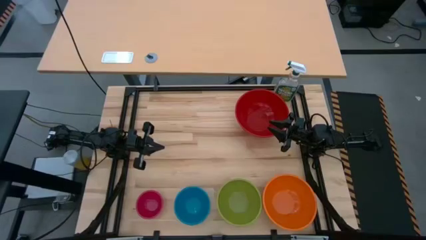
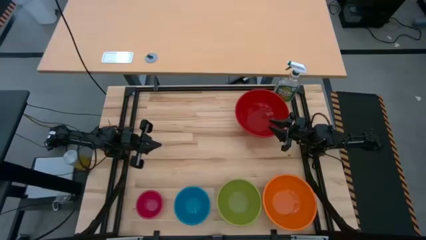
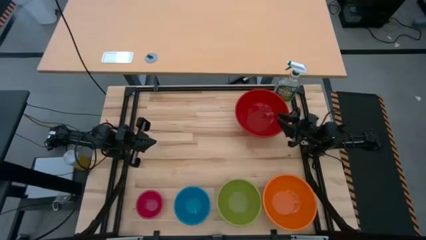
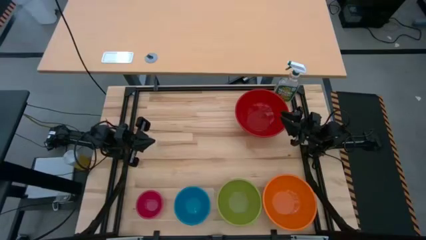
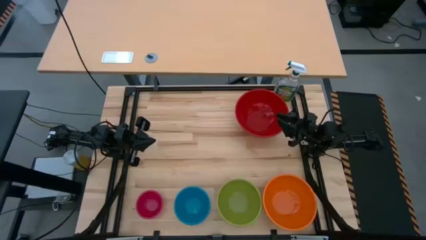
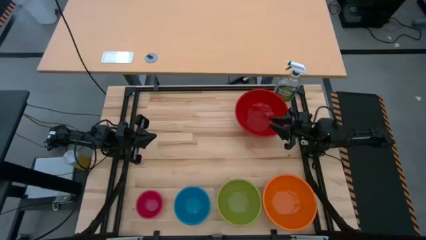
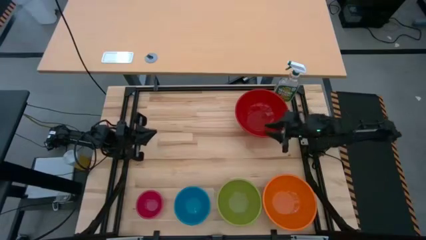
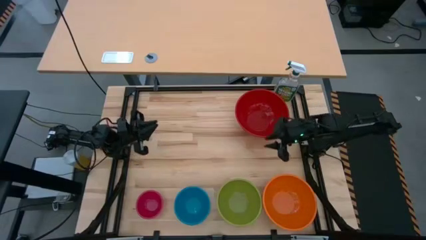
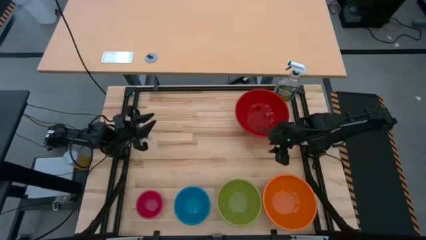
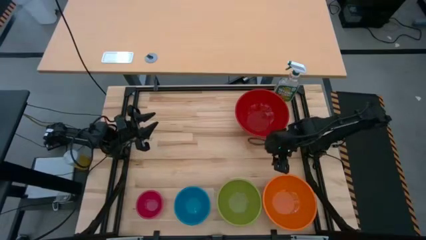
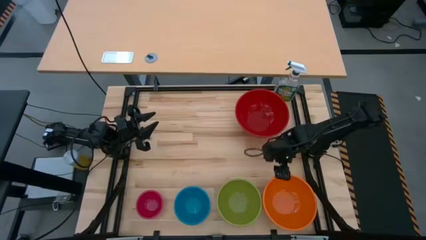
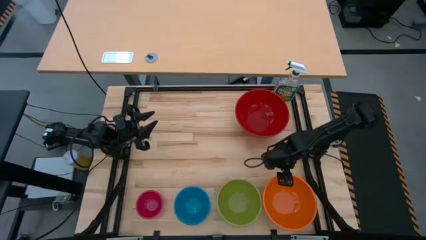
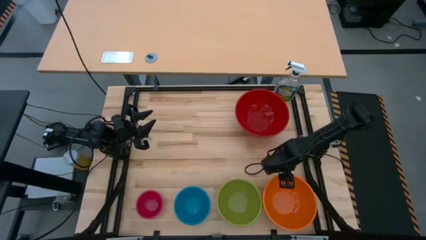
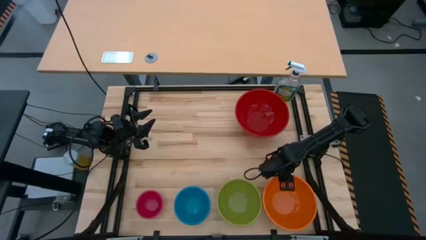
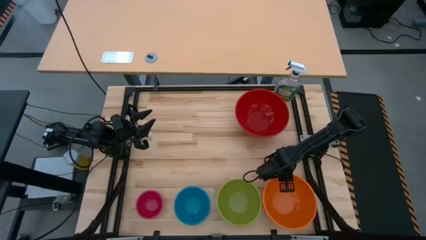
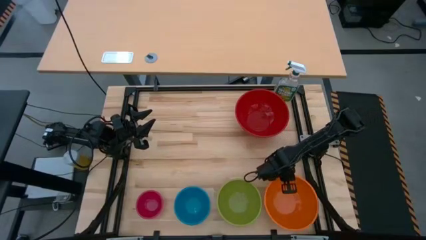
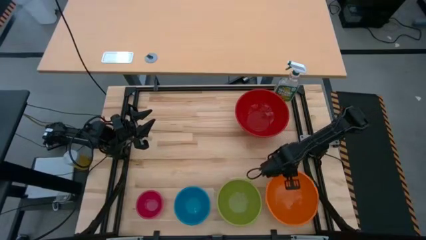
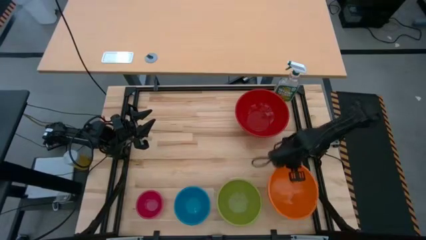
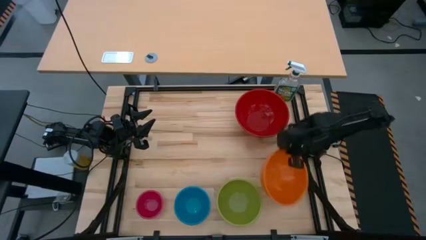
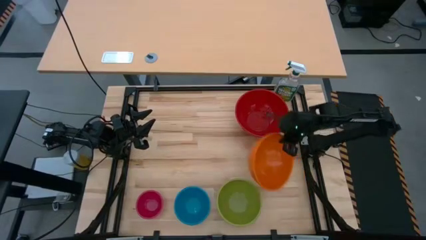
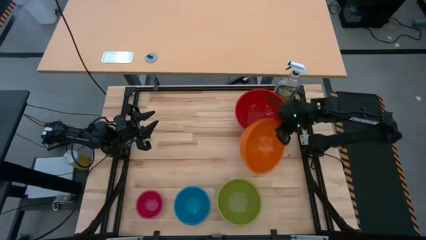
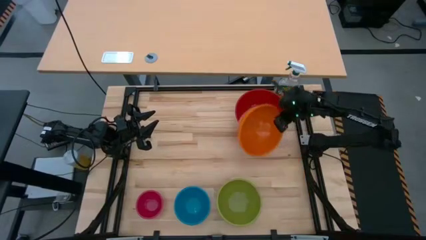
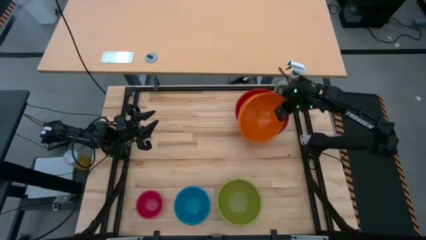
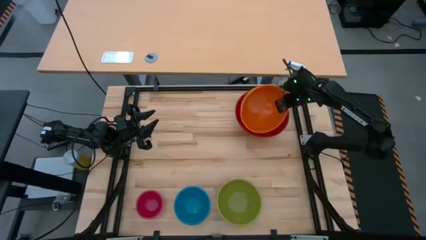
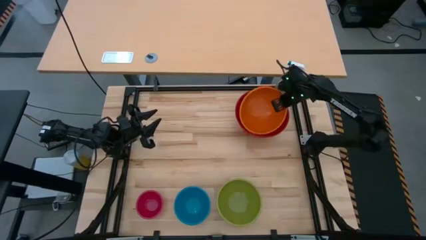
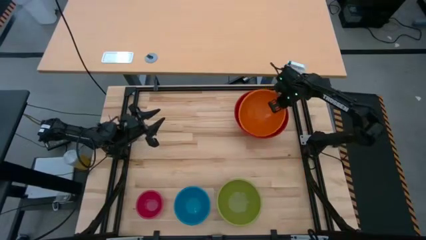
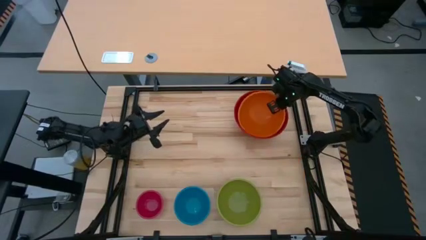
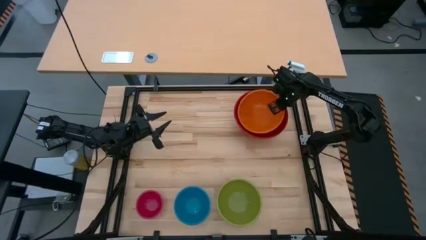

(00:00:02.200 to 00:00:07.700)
Stack the orange bowl on top of the red bowl

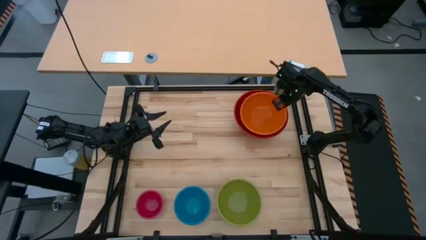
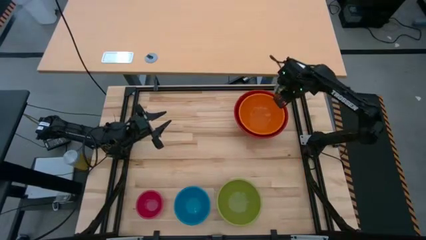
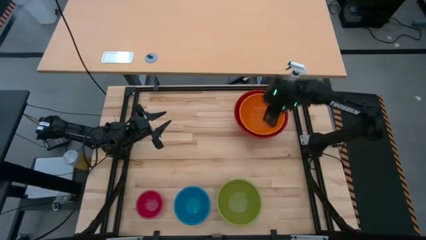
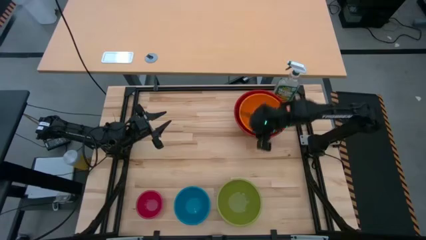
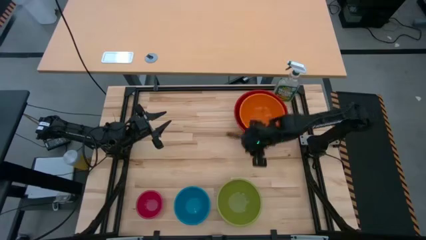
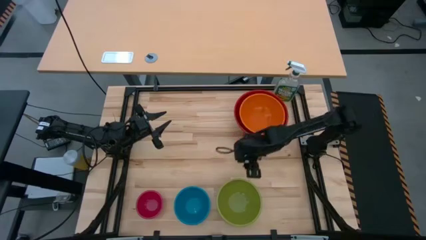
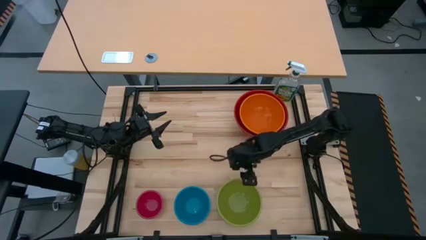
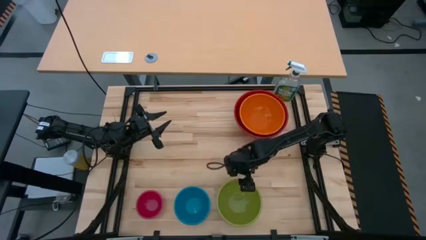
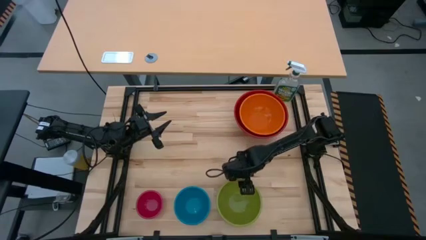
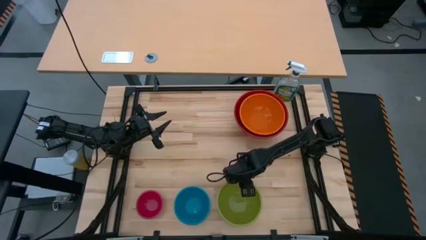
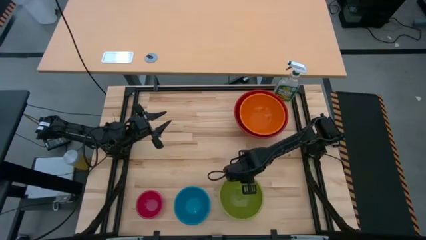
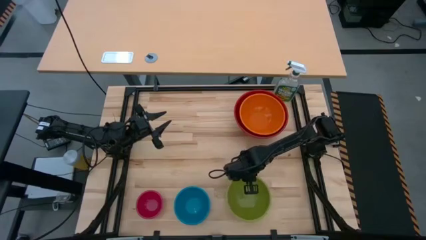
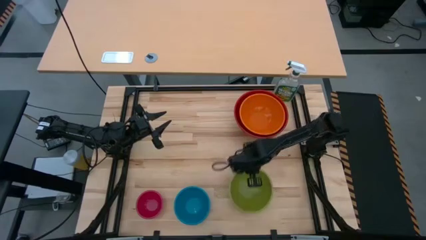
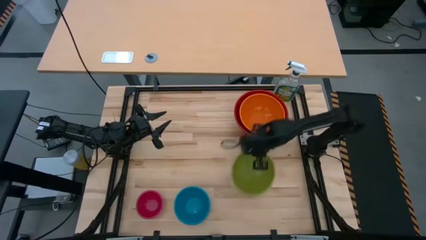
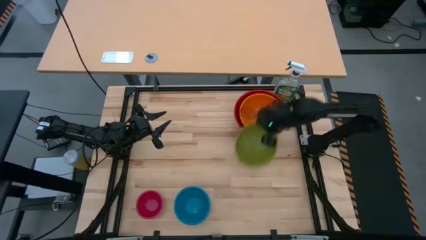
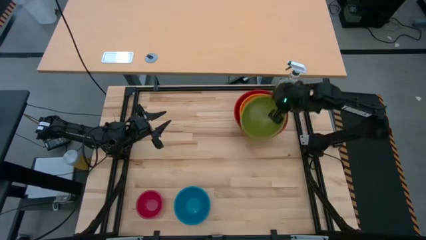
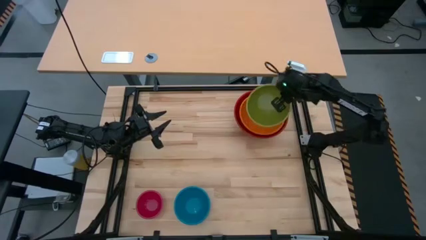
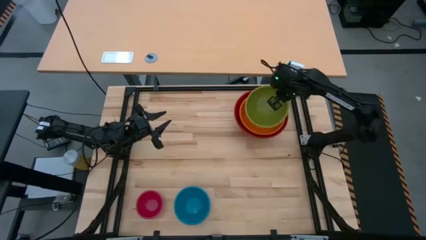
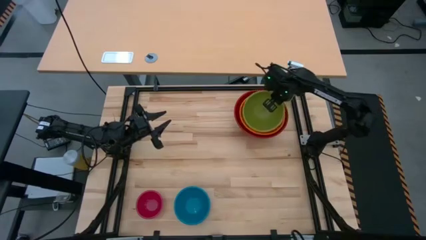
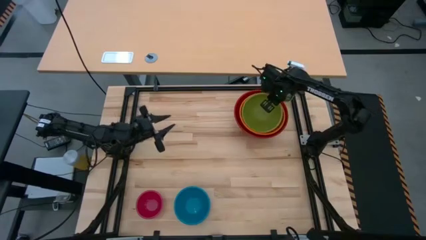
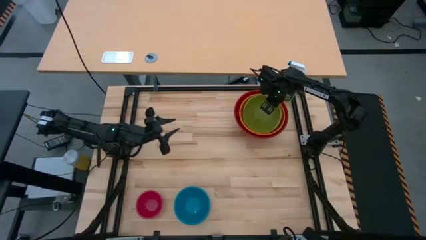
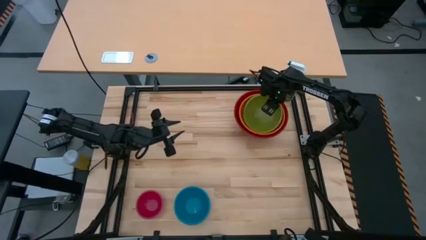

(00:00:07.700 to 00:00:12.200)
Stack the green bowl on top of the orange bowl

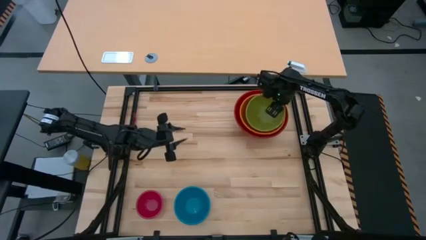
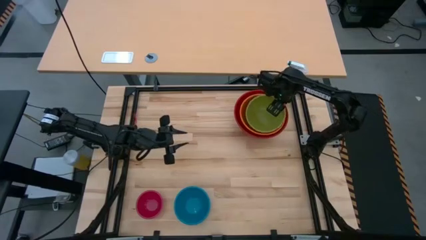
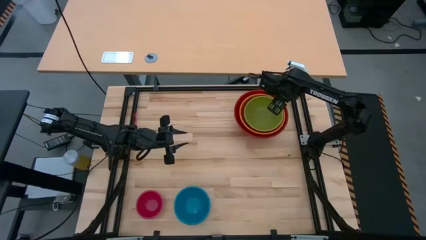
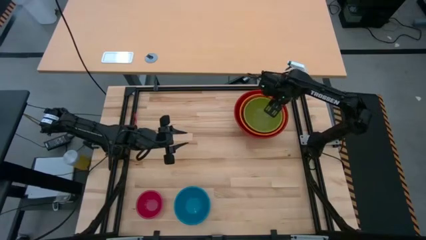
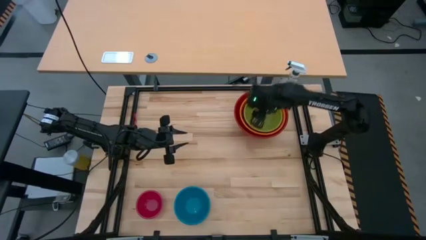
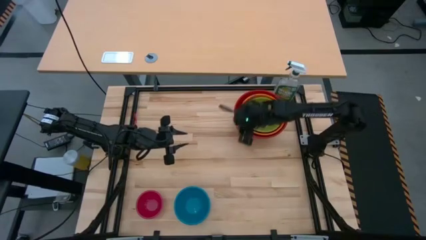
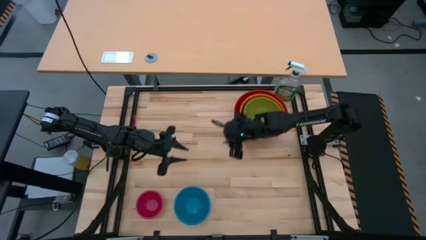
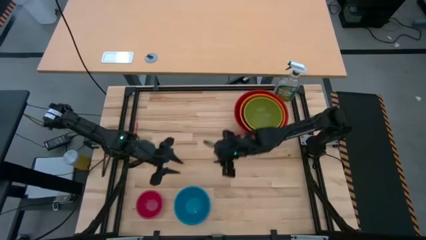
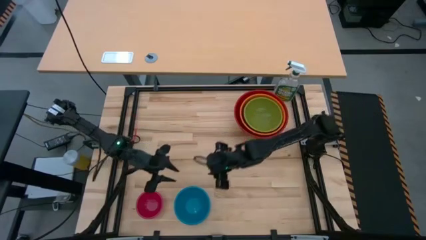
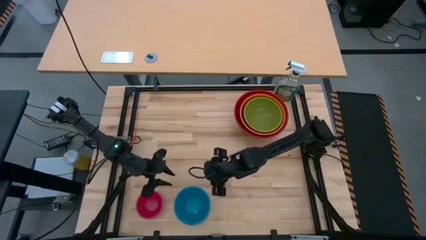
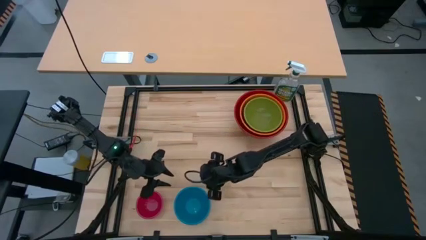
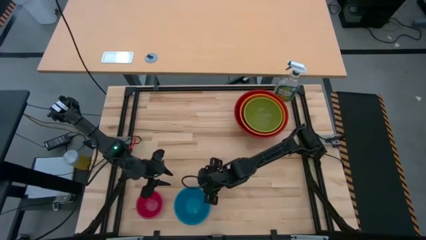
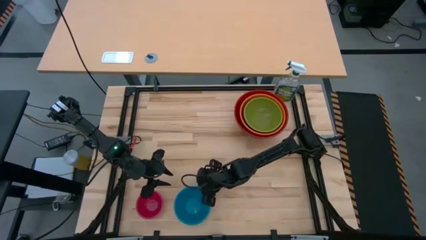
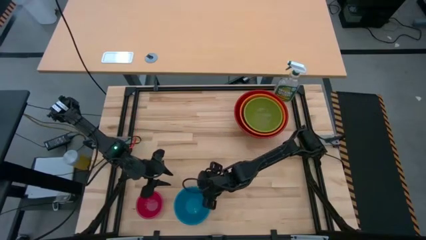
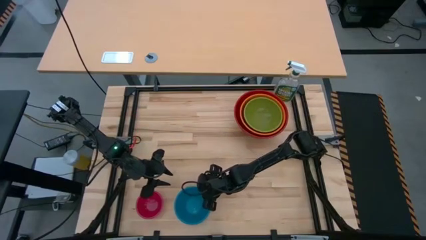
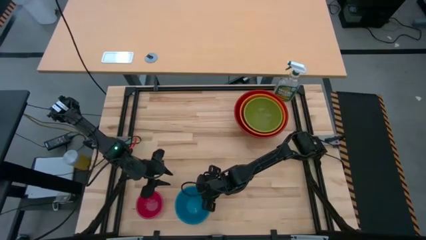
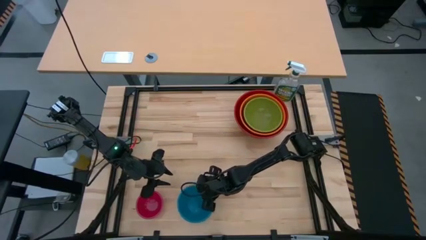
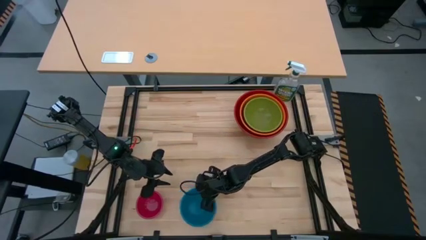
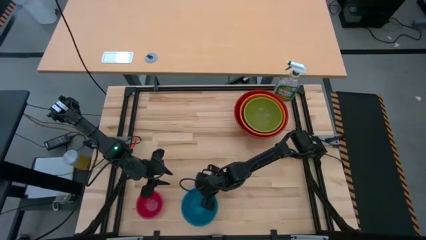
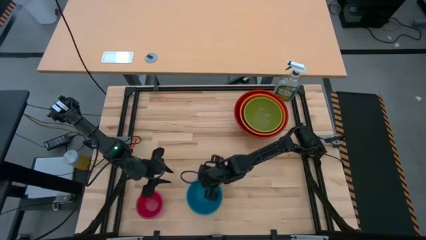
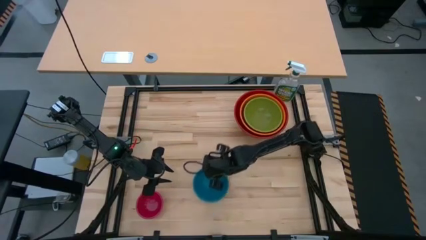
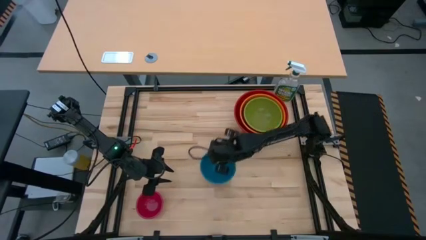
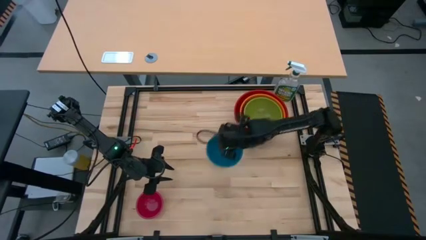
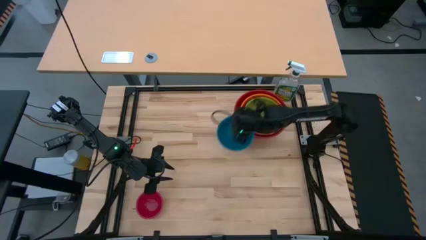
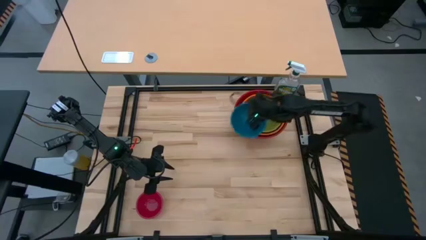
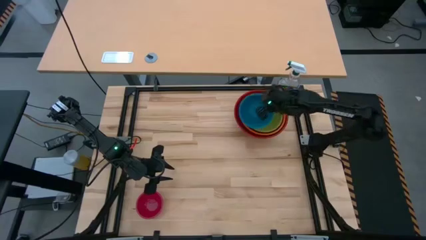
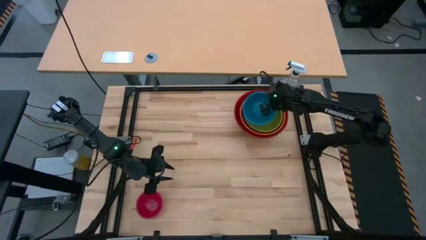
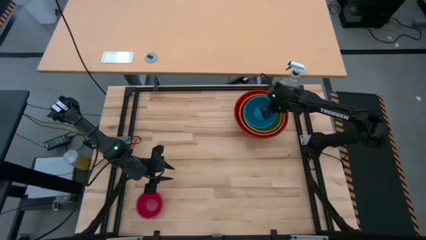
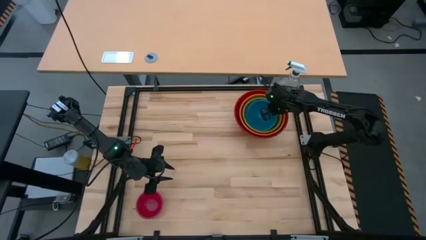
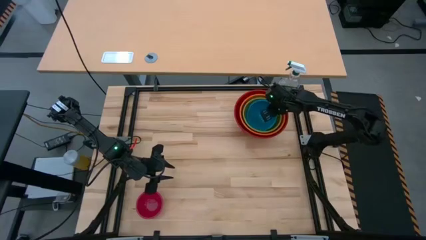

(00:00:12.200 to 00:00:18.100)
Stack the blue bowl on top of the green bowl
